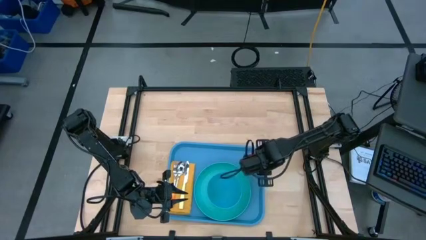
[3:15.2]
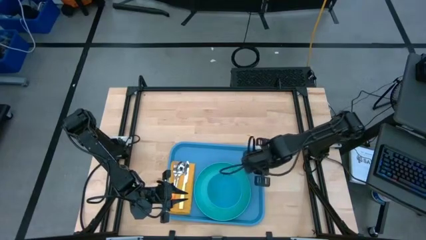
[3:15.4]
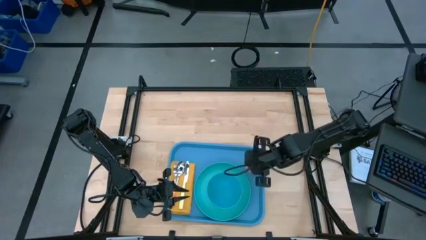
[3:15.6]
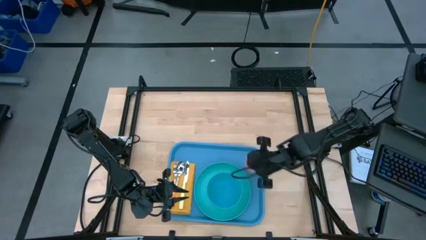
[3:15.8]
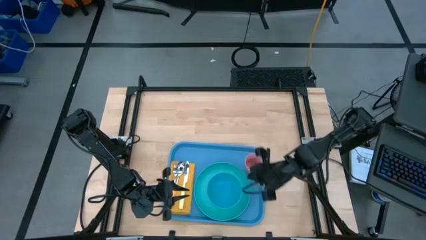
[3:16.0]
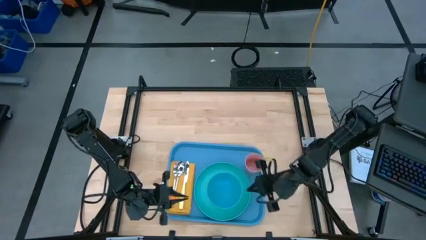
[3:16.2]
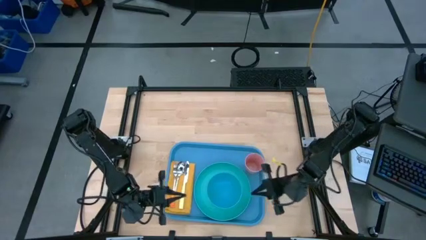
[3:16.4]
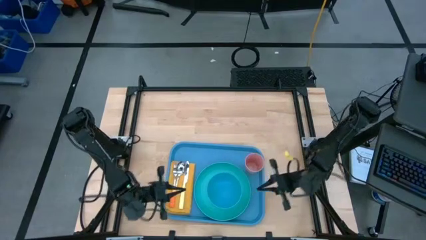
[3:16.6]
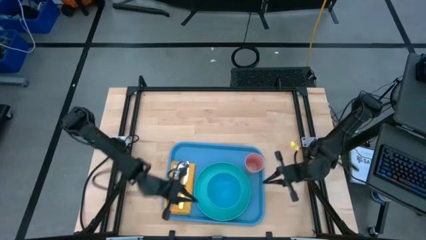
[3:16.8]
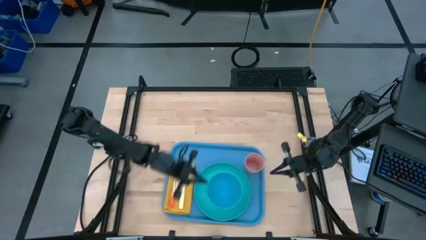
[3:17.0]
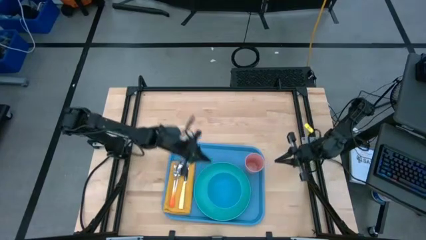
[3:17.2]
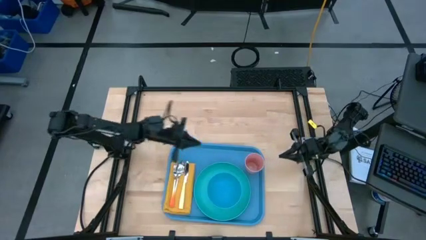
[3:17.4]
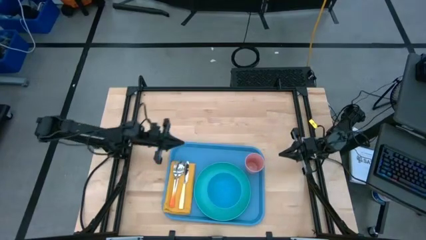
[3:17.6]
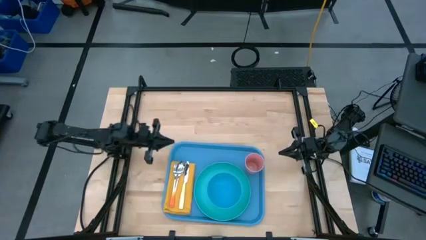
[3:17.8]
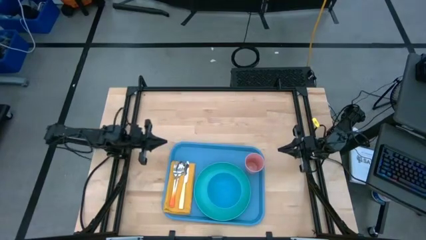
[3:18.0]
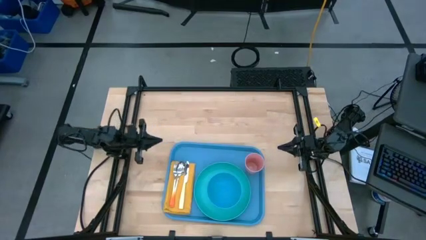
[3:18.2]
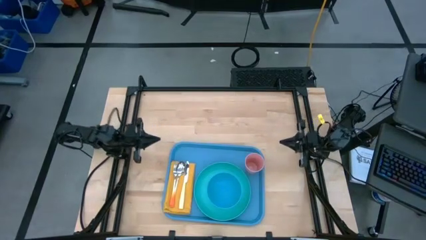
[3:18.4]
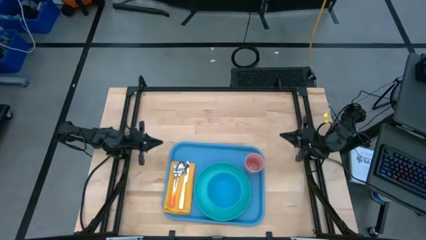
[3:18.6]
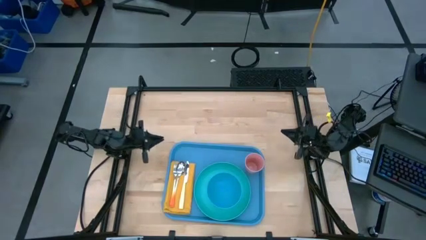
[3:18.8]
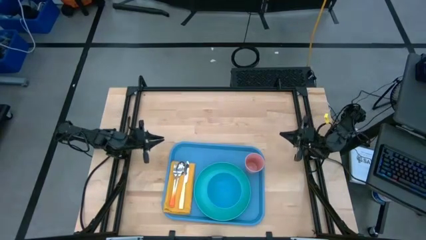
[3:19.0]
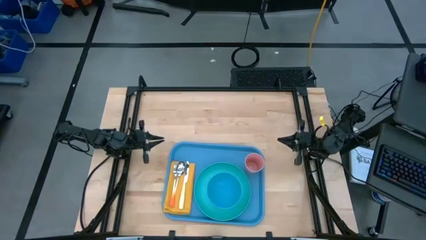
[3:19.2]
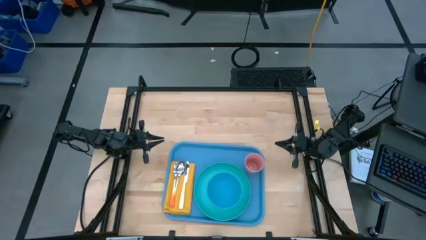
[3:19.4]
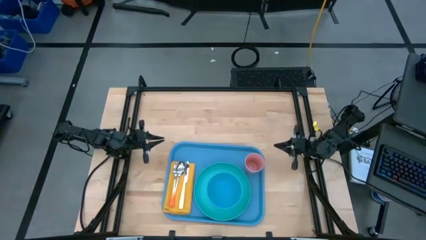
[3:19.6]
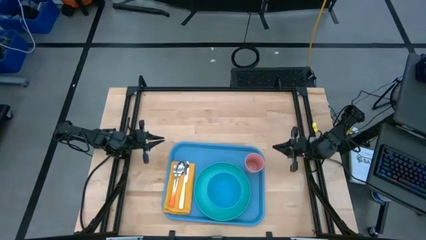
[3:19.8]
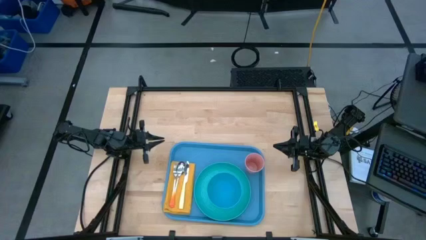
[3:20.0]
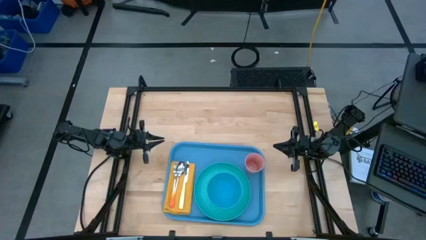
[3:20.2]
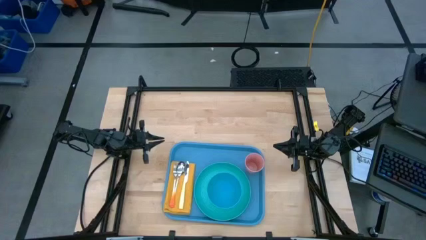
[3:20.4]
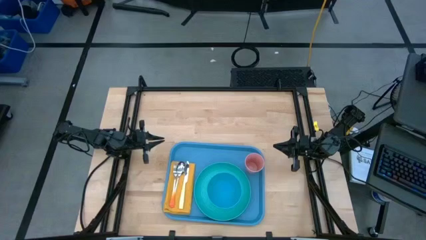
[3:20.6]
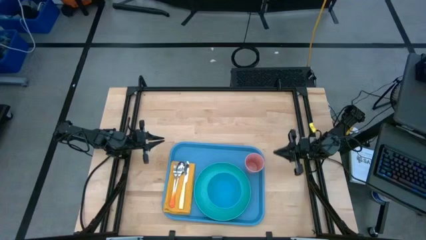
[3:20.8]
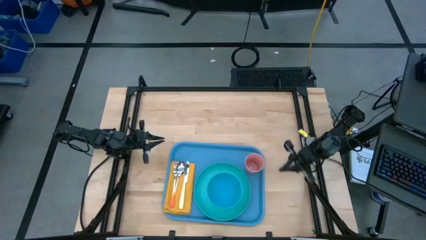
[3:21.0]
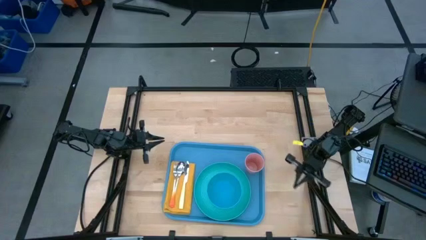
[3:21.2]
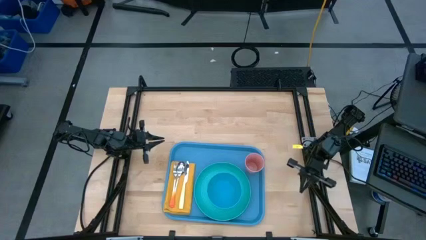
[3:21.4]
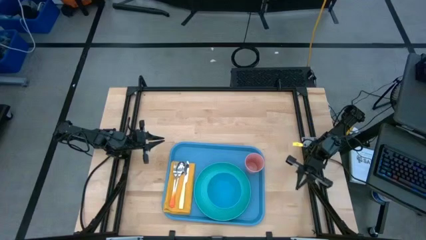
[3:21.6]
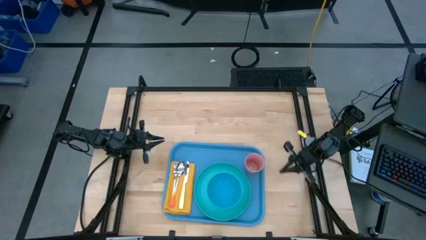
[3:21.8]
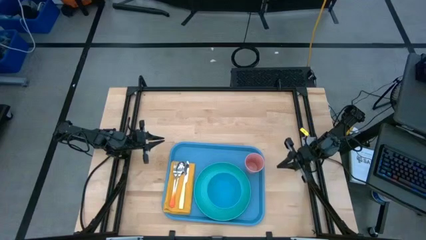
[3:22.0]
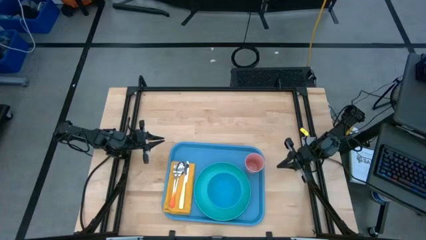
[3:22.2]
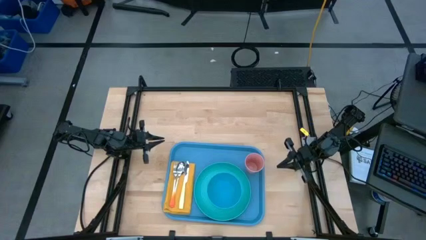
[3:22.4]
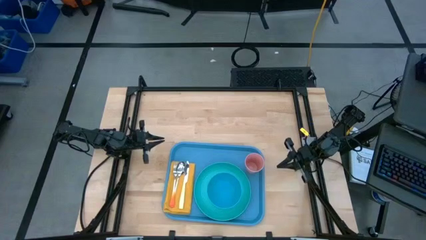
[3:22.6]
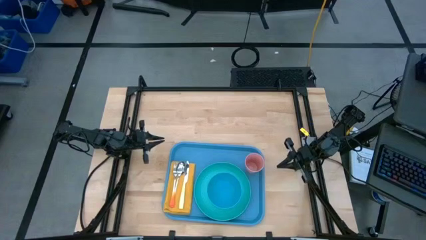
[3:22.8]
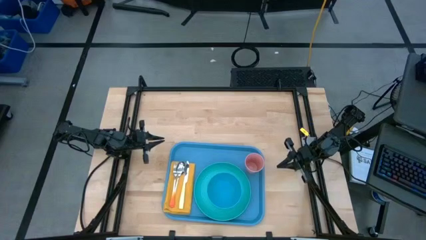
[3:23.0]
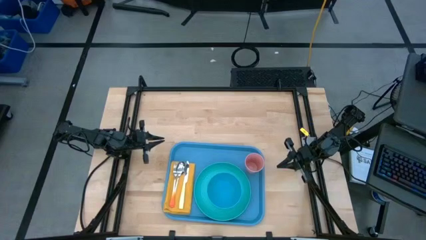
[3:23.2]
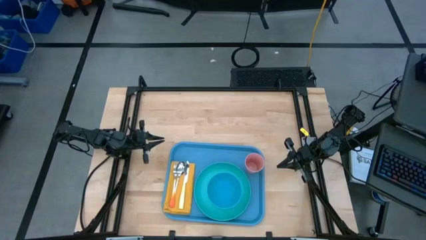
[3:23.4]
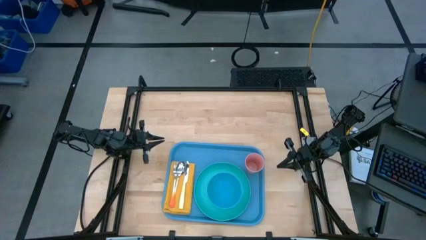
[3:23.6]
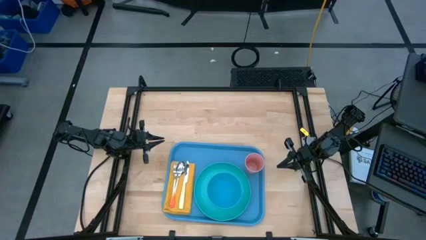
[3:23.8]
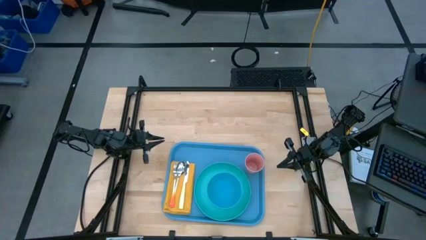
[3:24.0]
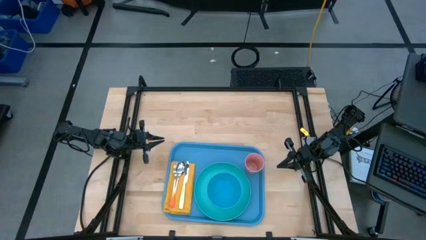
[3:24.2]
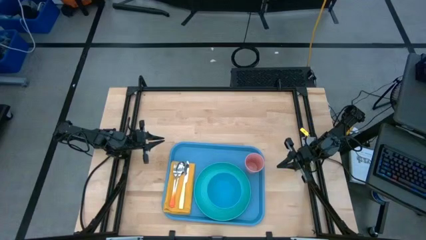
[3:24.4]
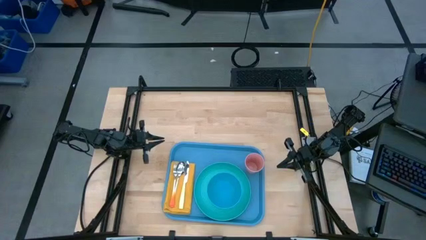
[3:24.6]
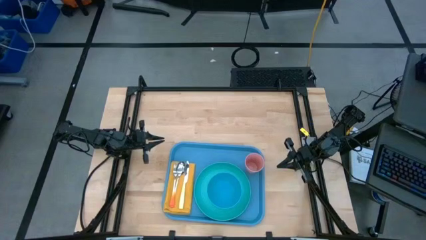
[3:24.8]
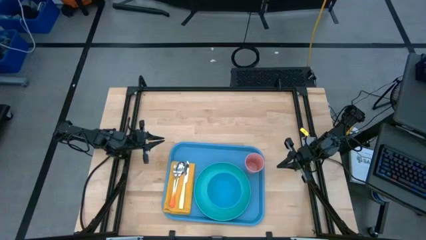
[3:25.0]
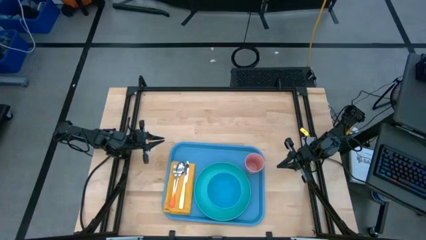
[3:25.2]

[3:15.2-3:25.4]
Task: Set up tray
Return to Home Position
